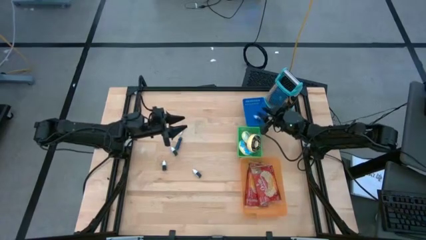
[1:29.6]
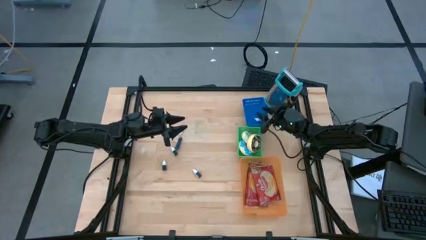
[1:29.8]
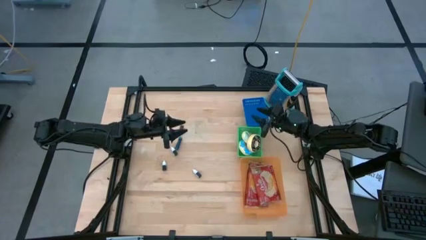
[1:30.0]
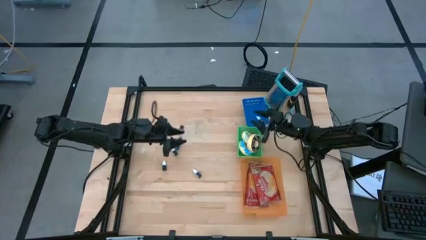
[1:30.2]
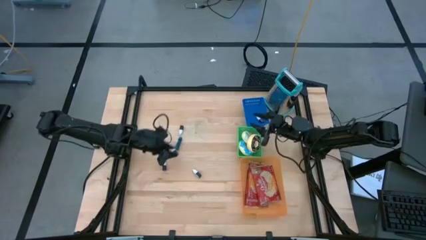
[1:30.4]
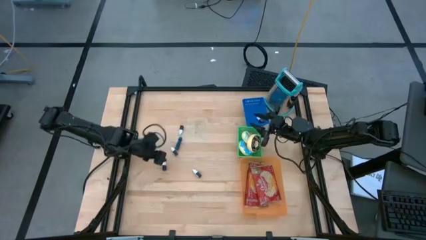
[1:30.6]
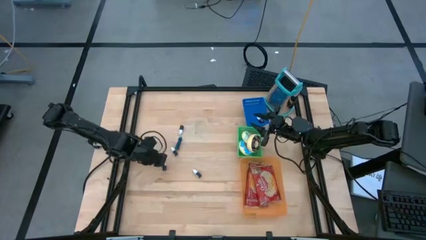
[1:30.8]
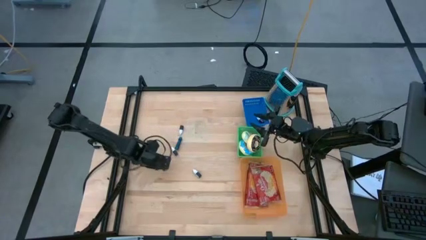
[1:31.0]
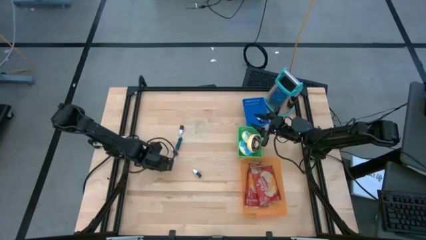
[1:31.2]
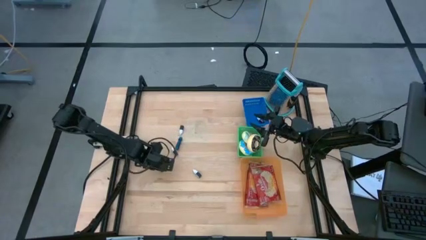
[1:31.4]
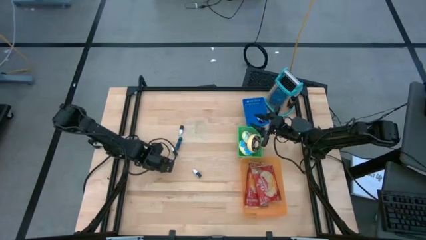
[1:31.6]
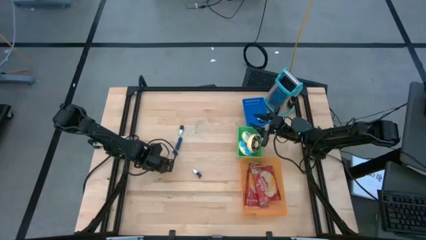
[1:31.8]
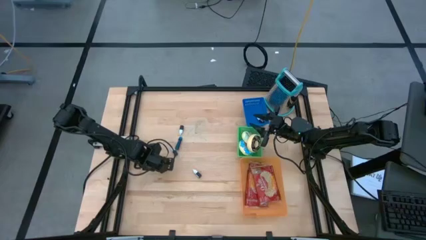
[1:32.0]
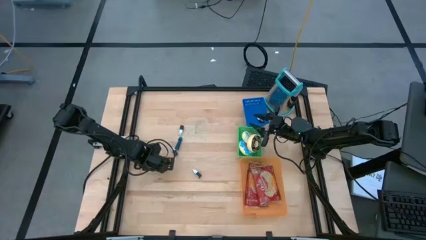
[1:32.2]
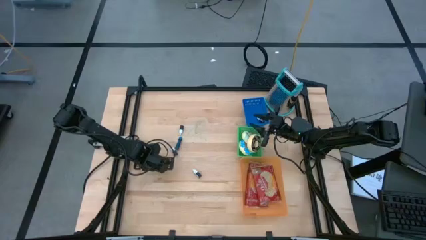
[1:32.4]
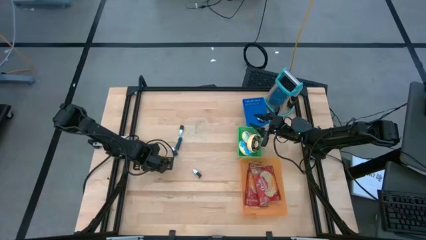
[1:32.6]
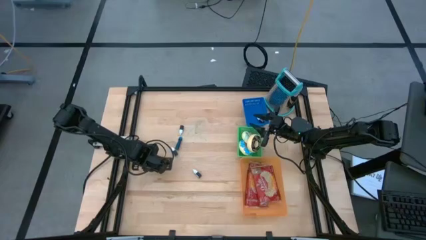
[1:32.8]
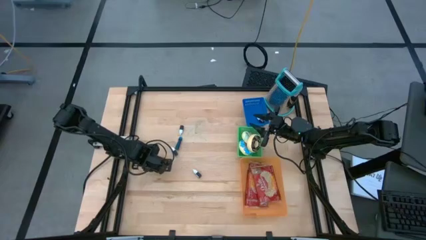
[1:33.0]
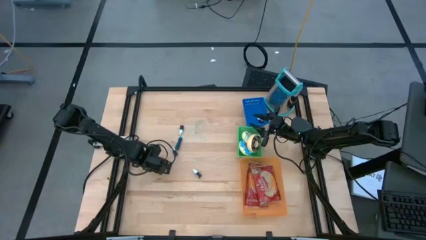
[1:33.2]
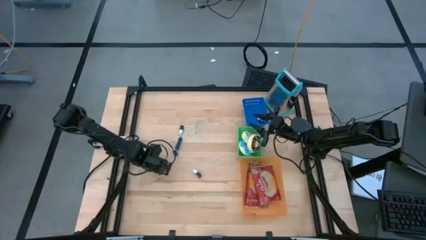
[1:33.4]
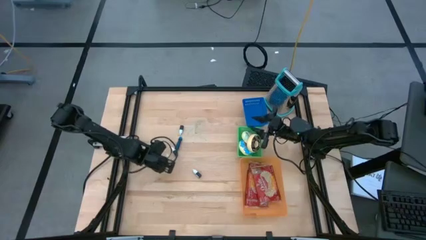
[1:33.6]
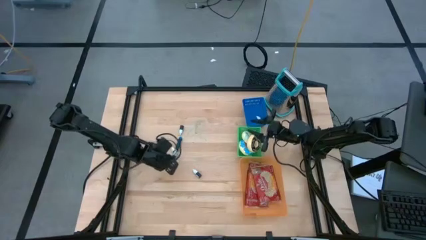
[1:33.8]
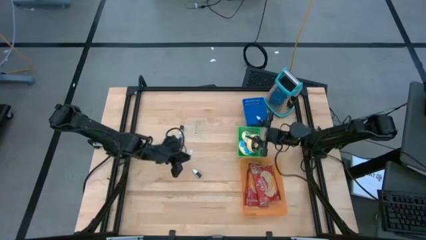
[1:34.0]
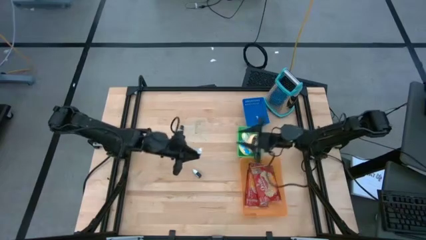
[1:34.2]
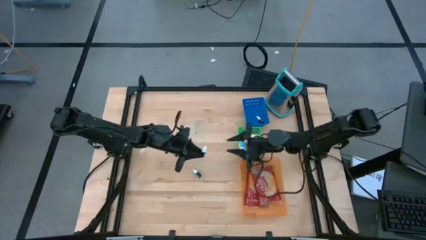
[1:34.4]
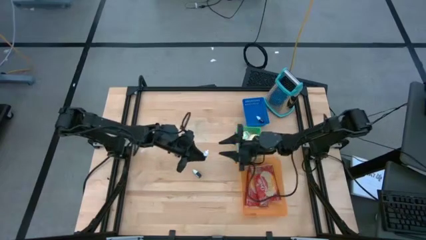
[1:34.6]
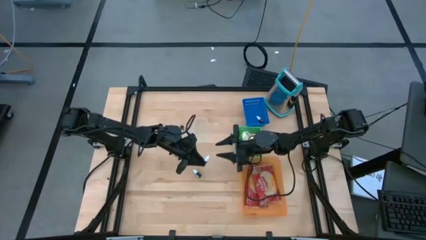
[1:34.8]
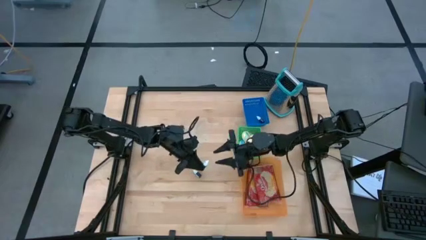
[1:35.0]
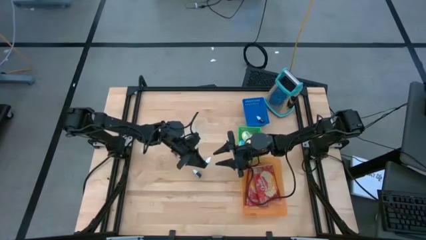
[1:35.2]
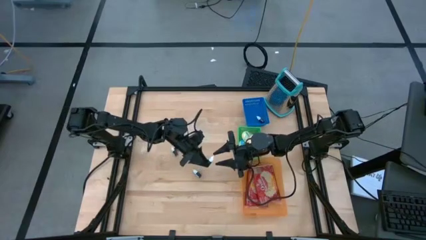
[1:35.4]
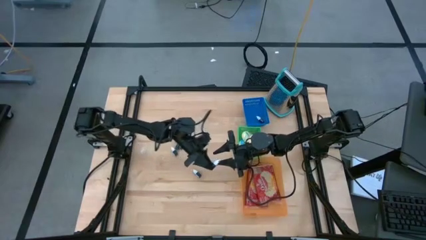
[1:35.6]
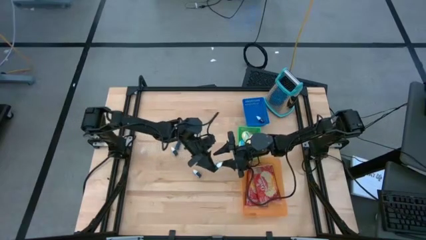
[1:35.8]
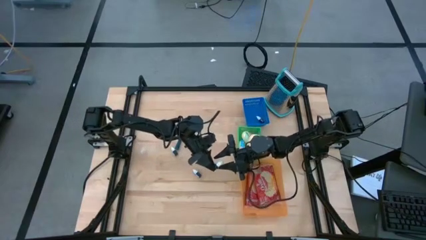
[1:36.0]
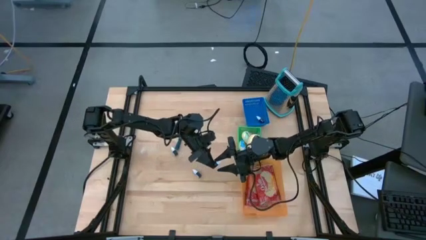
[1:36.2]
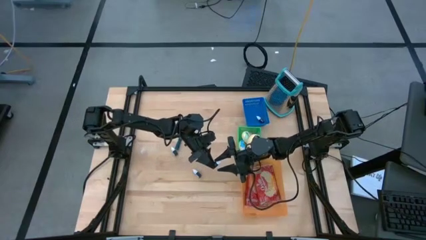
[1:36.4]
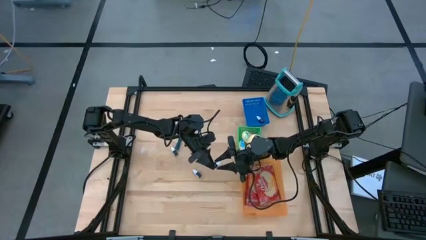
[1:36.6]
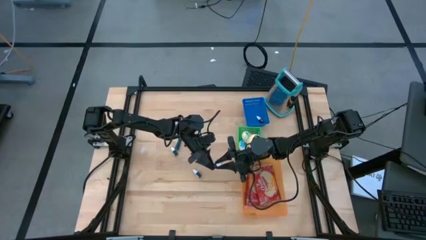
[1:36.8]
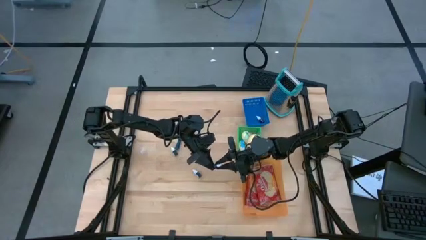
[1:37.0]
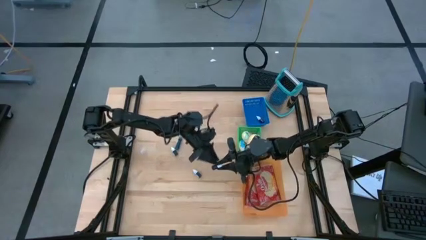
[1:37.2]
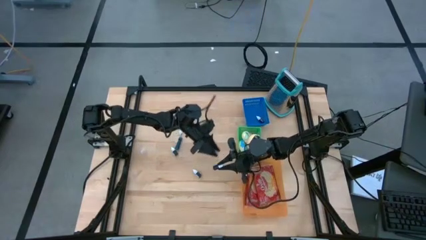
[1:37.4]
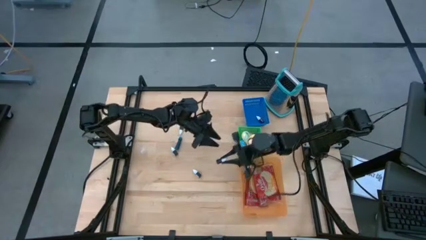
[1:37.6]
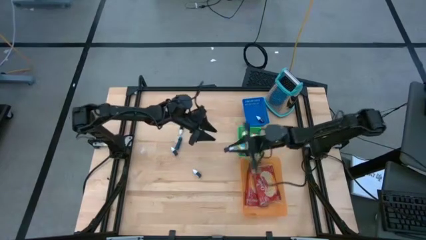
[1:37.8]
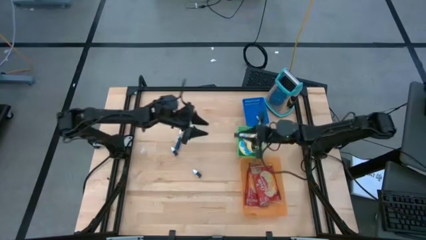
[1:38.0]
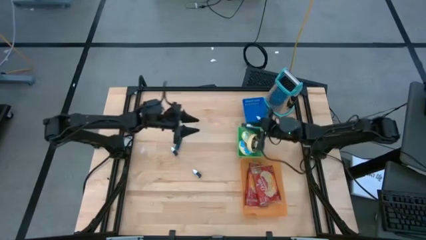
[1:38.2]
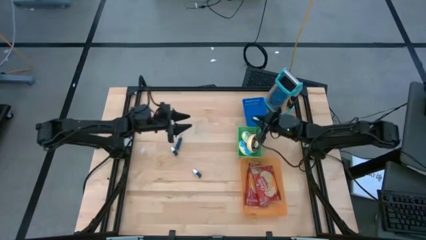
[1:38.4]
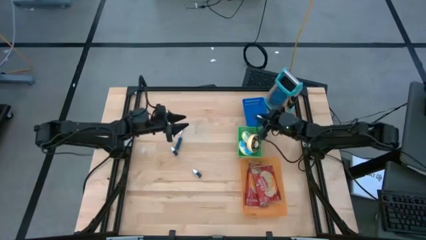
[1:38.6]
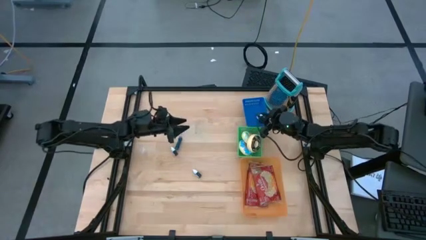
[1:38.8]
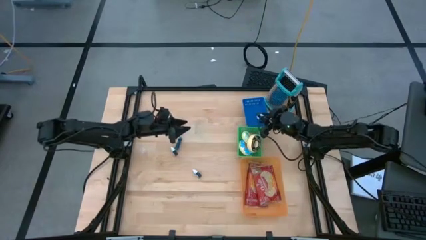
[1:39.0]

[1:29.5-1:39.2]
Put the bottom green food coloring bottle into the blue bin

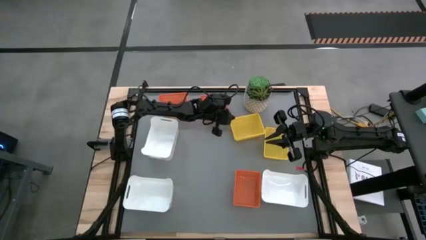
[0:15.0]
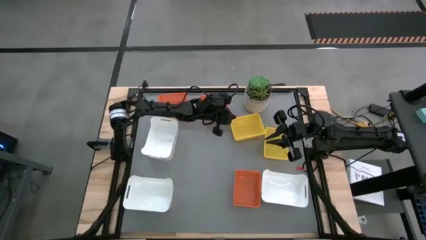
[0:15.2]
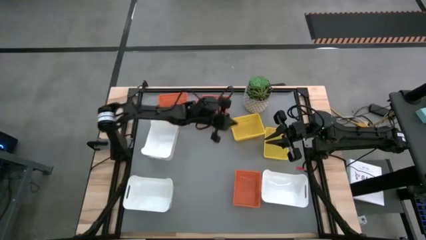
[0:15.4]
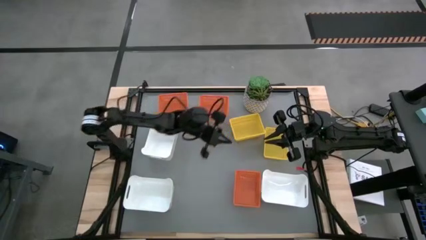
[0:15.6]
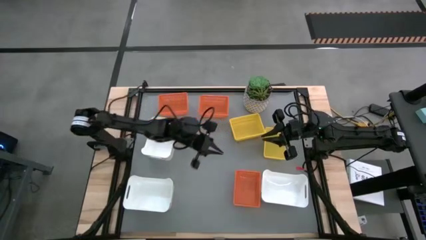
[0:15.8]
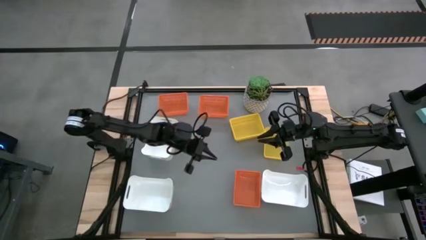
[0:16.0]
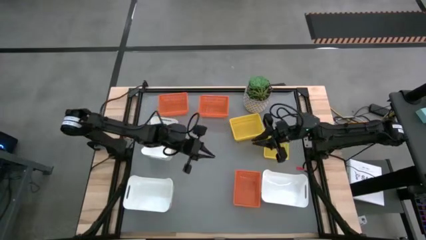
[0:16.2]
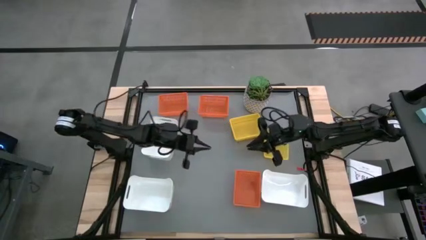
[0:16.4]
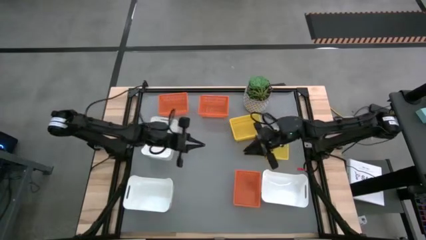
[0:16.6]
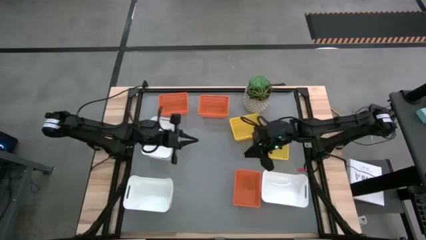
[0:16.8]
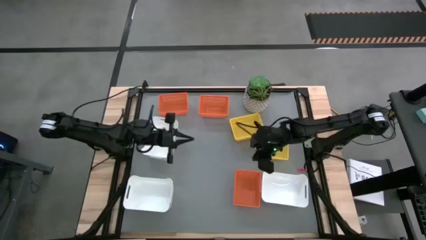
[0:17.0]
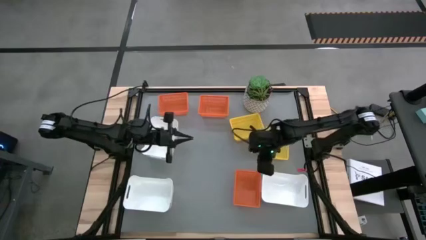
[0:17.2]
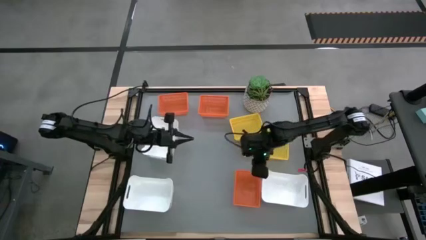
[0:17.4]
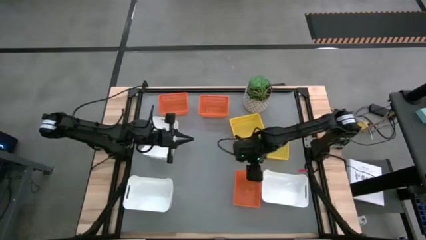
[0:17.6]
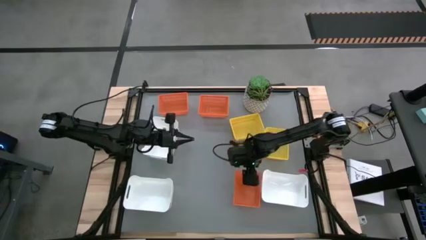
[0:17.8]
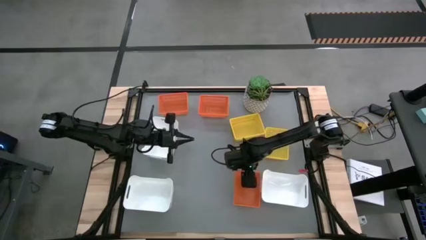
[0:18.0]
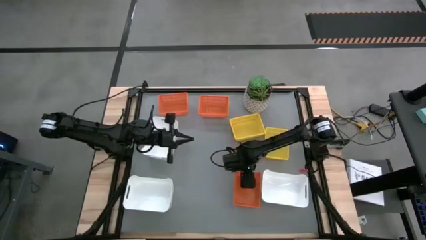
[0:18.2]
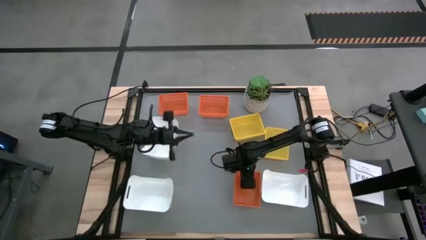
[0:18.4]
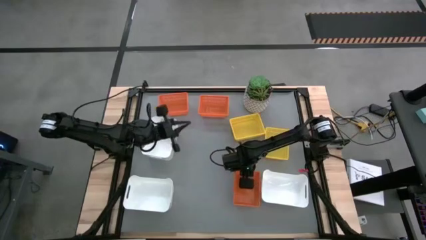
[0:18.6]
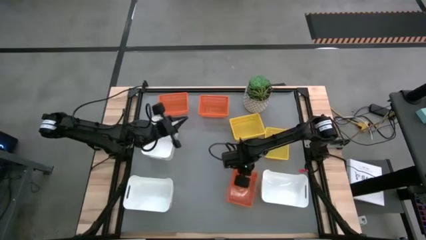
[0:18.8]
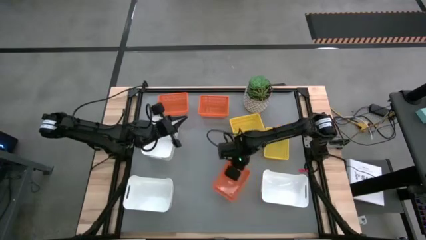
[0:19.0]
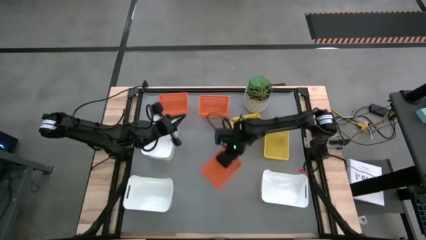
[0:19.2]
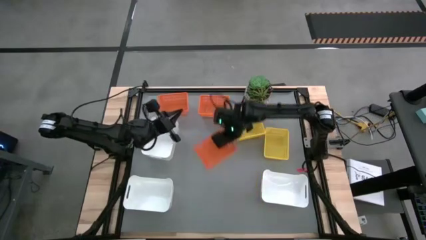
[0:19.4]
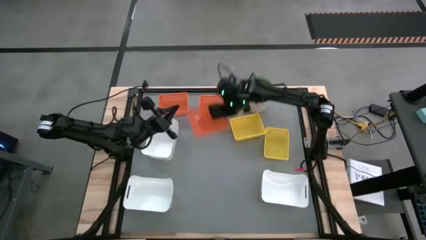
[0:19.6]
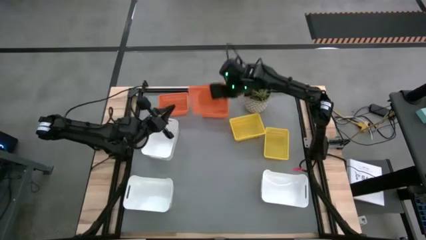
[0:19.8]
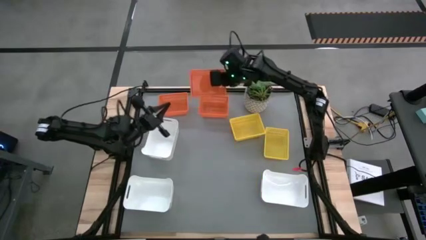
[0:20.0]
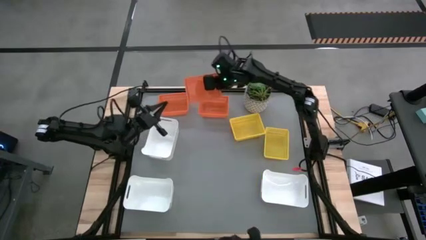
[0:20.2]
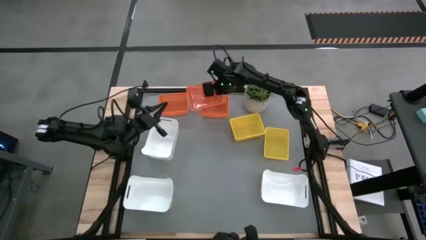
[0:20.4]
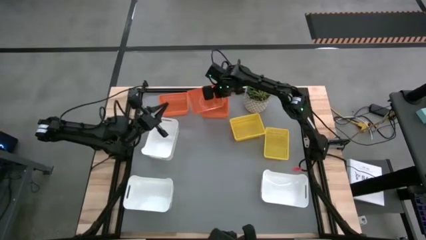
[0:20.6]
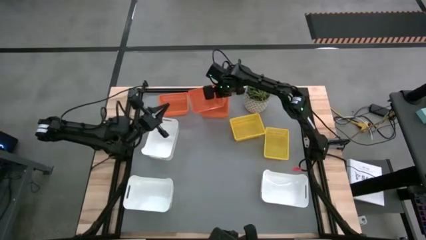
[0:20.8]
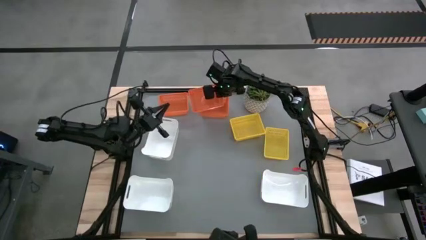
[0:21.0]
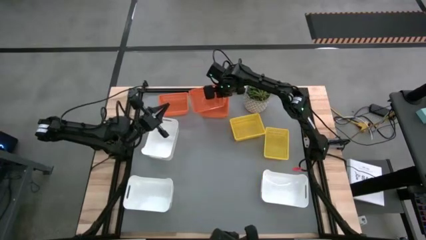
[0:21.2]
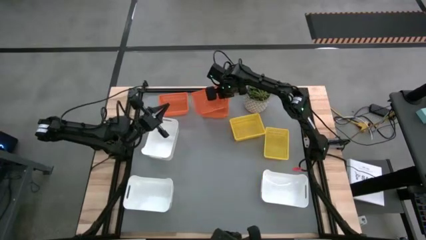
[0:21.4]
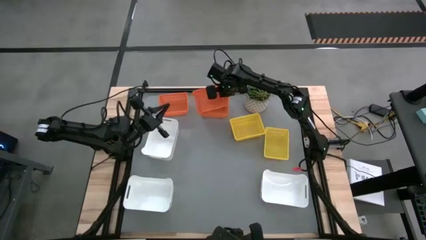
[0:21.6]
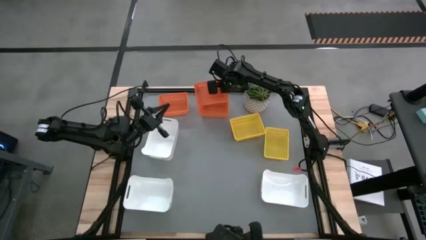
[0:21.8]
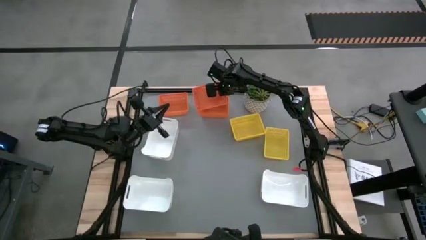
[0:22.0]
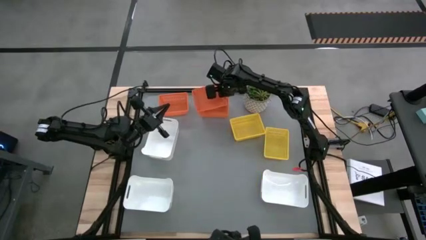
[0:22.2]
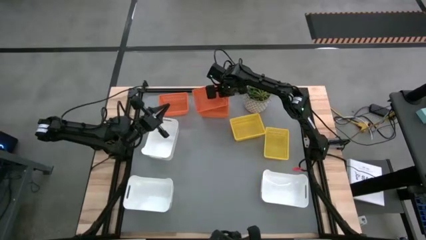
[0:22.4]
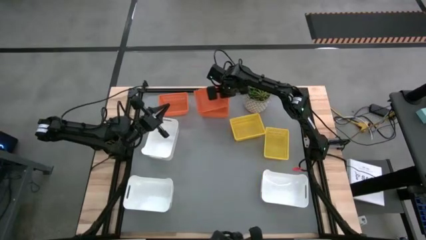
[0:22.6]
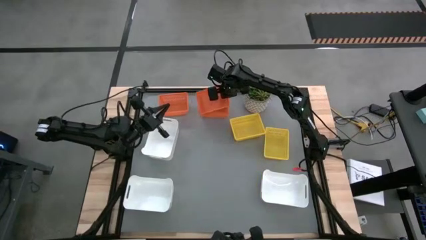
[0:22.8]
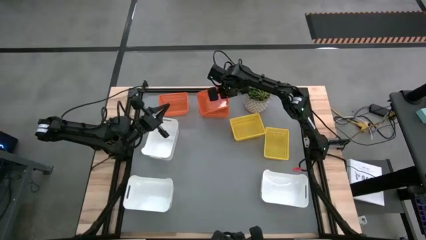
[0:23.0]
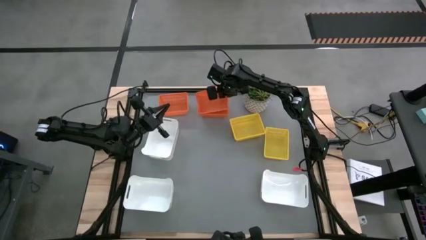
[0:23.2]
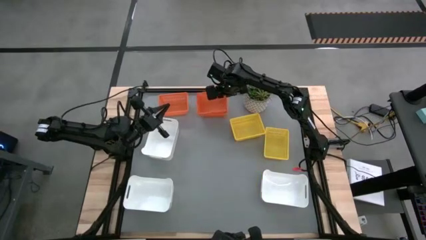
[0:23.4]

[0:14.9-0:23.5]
Stack the bottom orange bin on top of the top right orange bin
